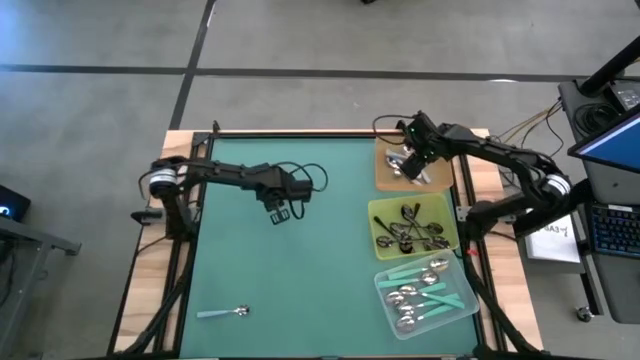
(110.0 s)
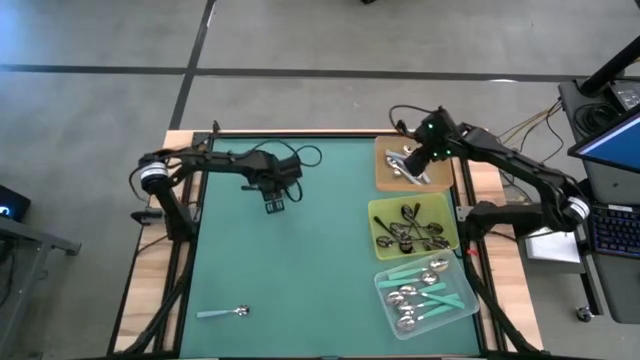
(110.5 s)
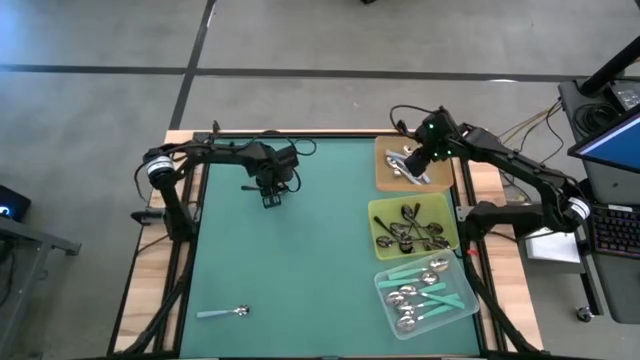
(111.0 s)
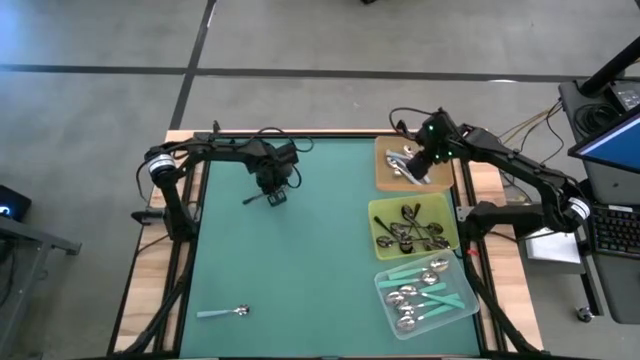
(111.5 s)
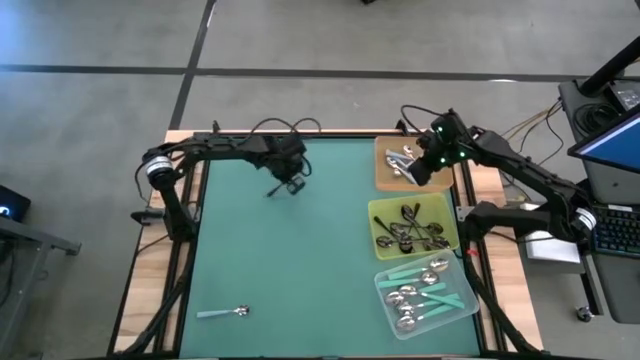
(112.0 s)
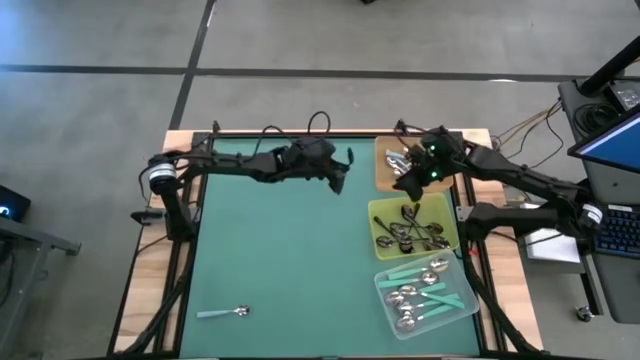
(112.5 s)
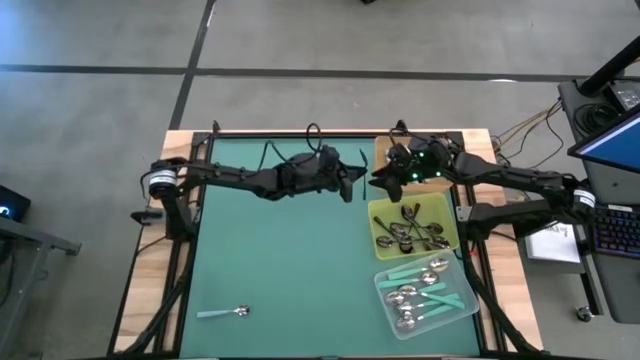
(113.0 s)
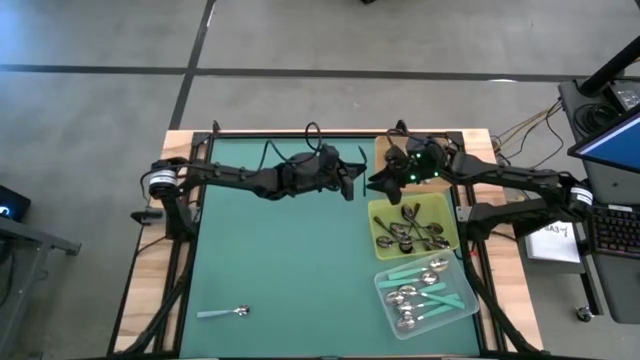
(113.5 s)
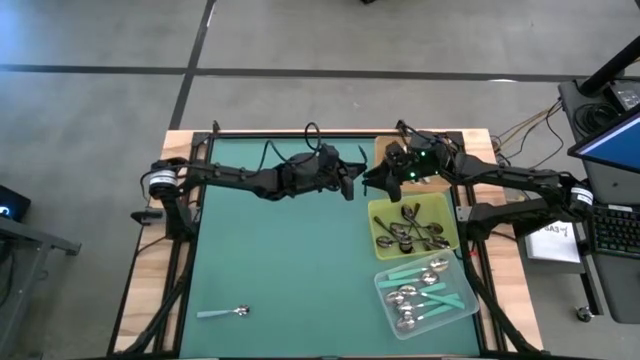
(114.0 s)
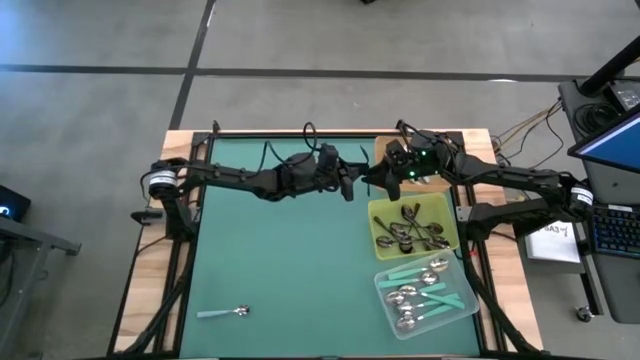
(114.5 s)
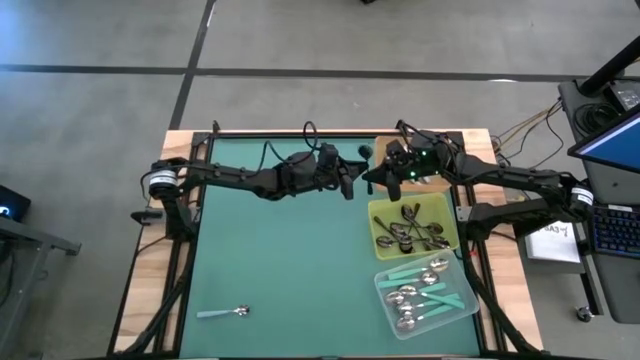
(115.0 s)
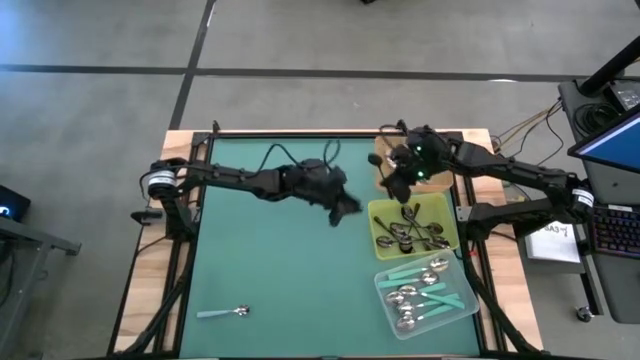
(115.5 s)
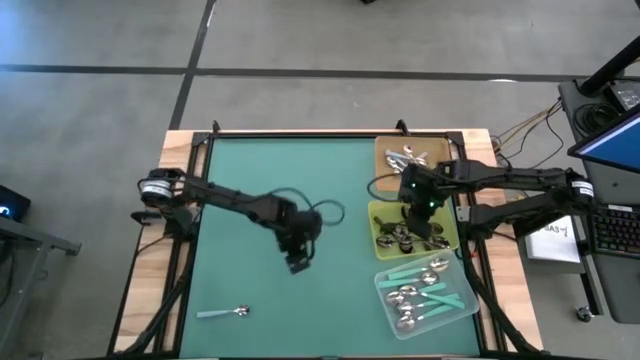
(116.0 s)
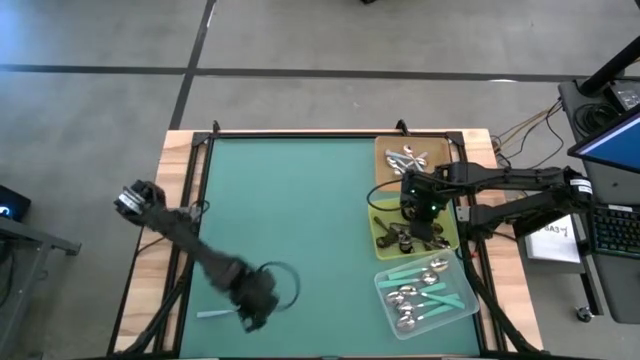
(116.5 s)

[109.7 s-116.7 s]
Task: Sort silverware by color (type)
Put the black spoon into the yellow bin

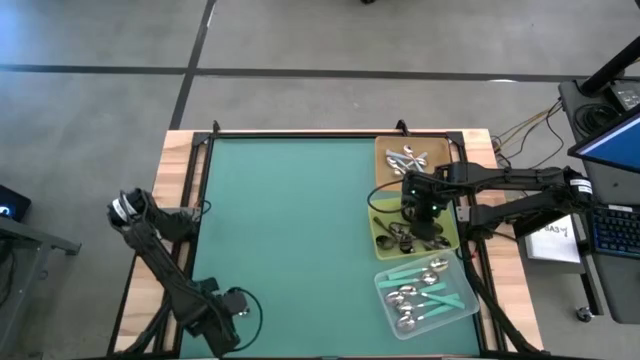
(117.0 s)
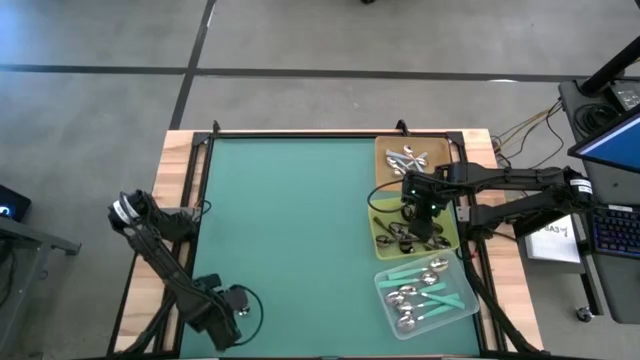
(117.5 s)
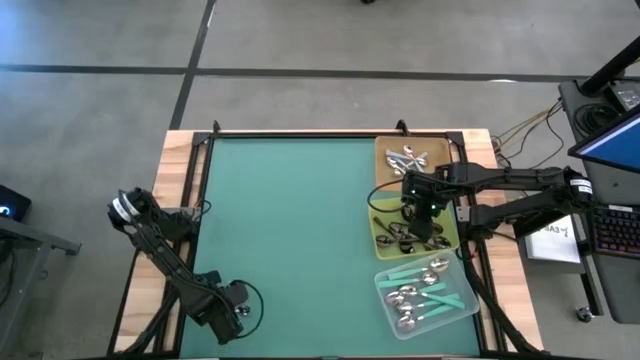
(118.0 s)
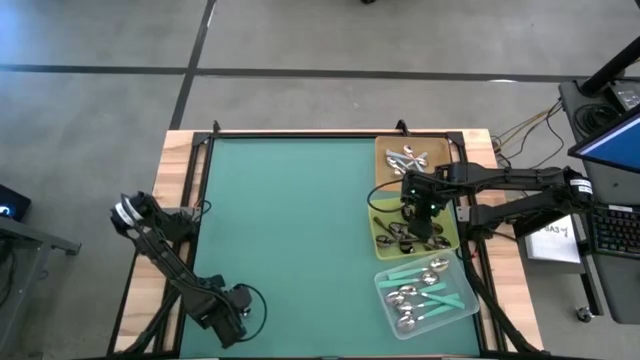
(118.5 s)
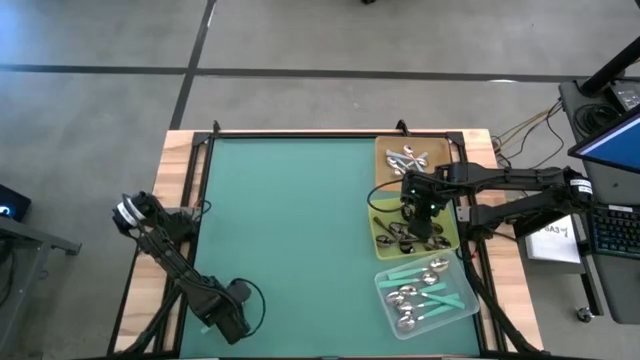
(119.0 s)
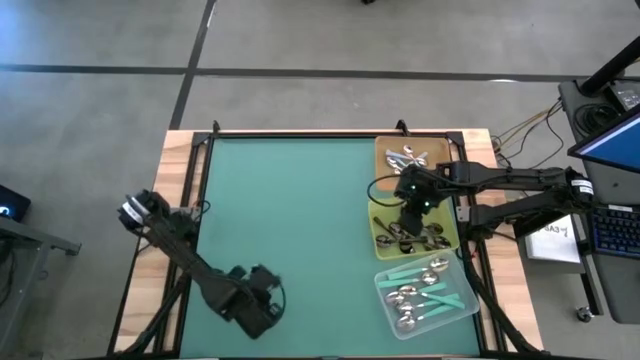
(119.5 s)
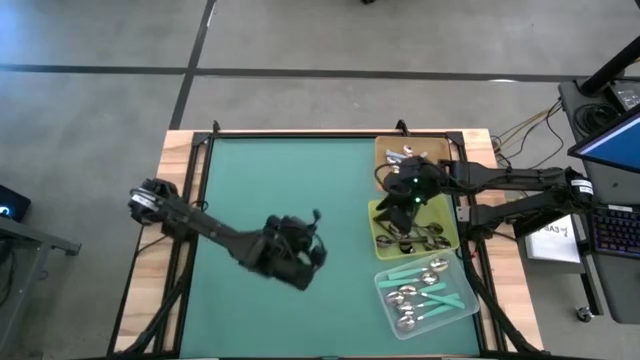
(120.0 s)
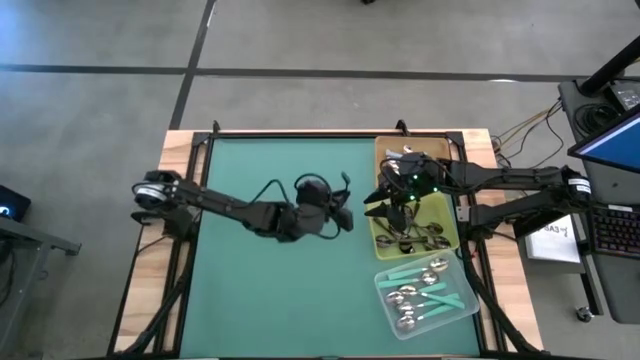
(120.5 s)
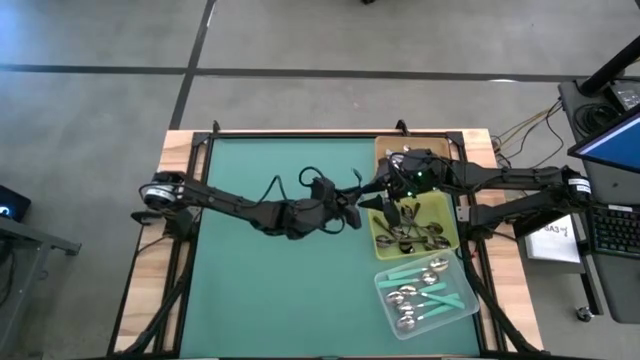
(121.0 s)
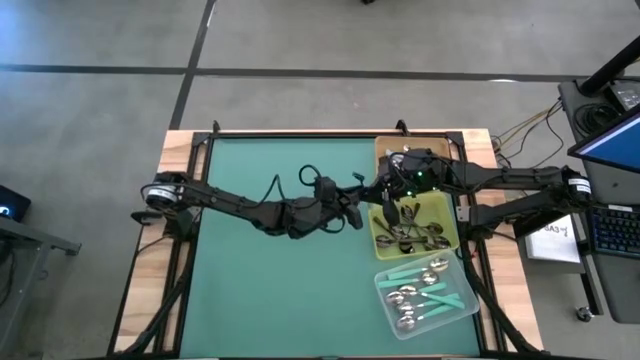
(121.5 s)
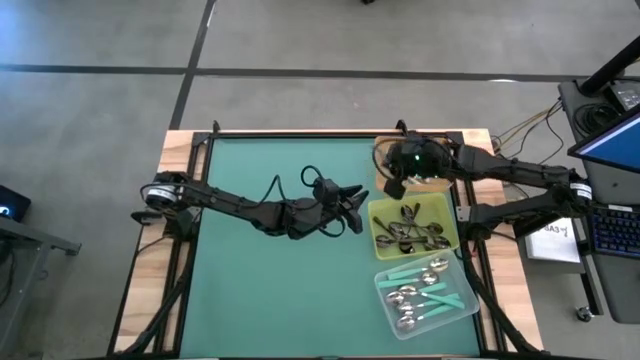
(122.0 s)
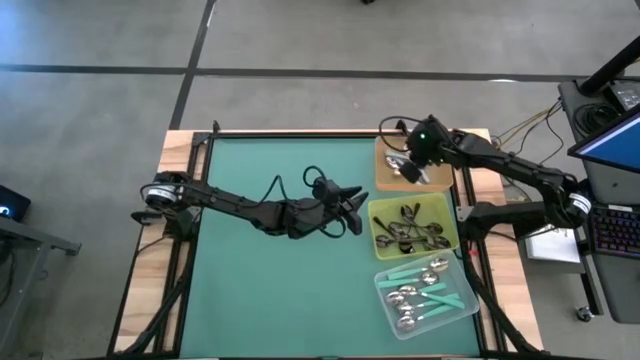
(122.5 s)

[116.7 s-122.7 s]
Put the blue spoon into the orange bin

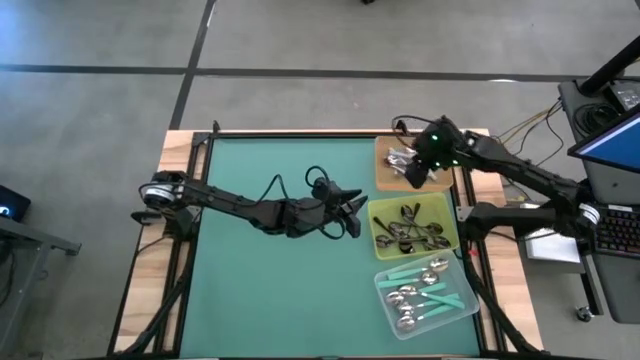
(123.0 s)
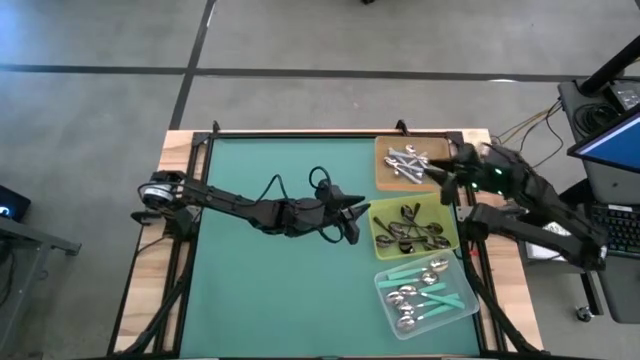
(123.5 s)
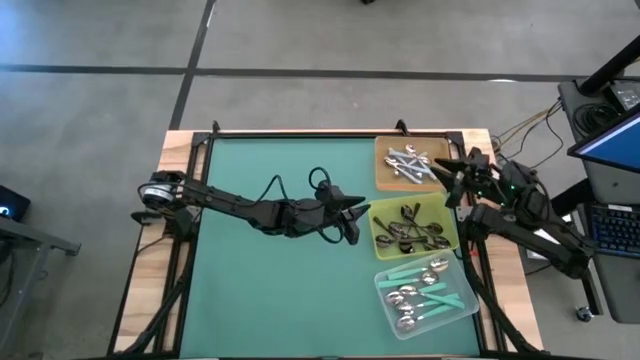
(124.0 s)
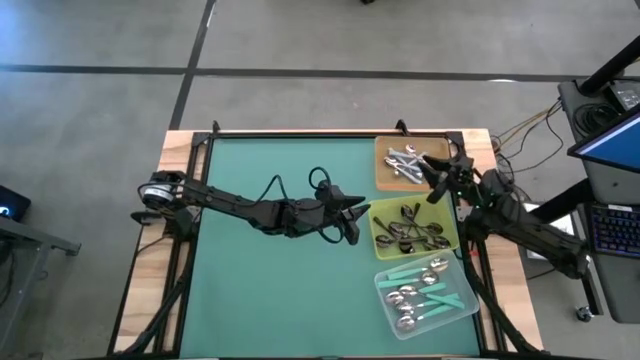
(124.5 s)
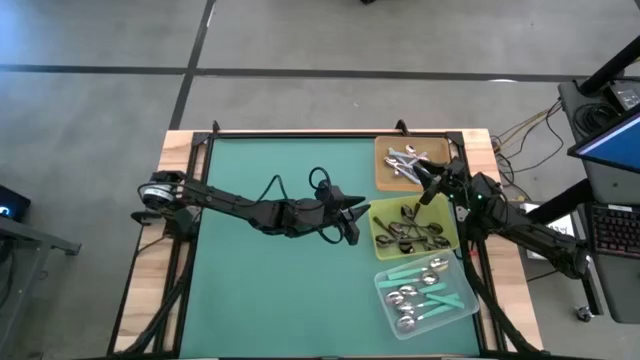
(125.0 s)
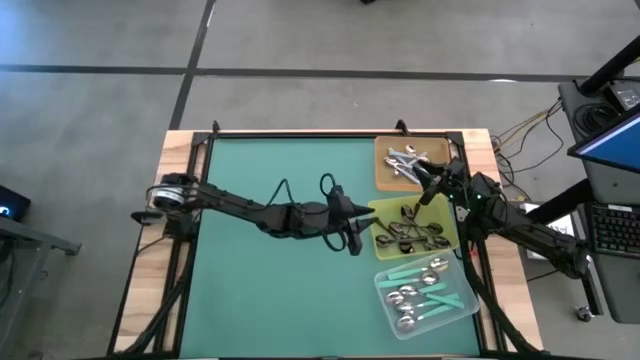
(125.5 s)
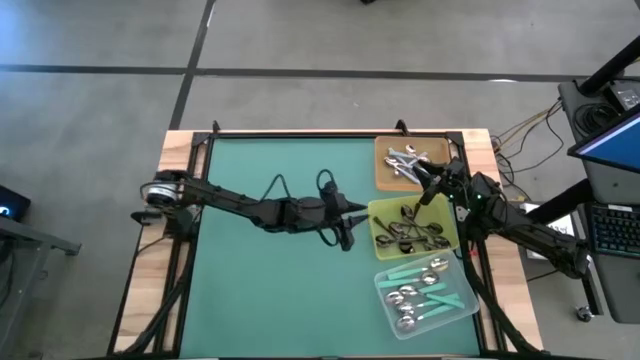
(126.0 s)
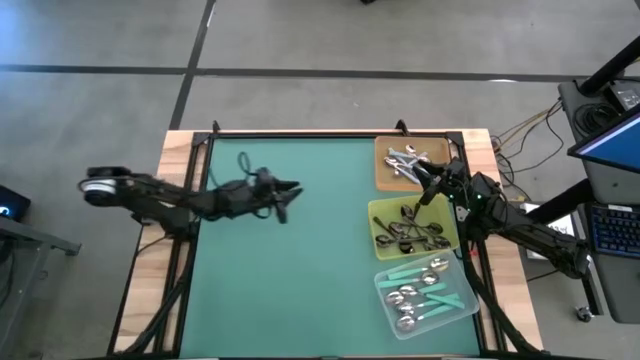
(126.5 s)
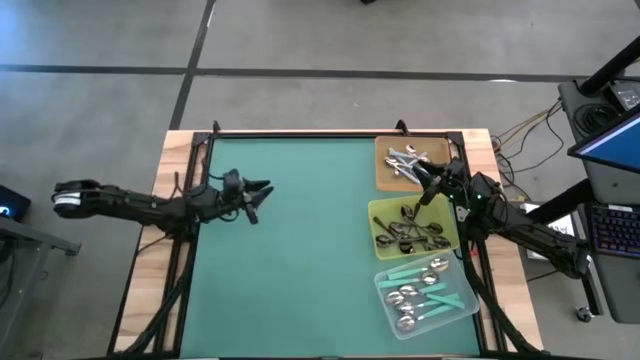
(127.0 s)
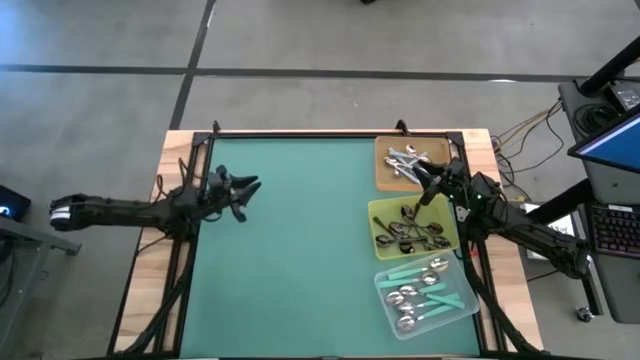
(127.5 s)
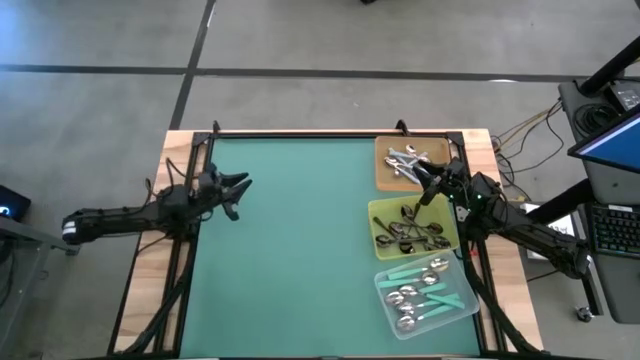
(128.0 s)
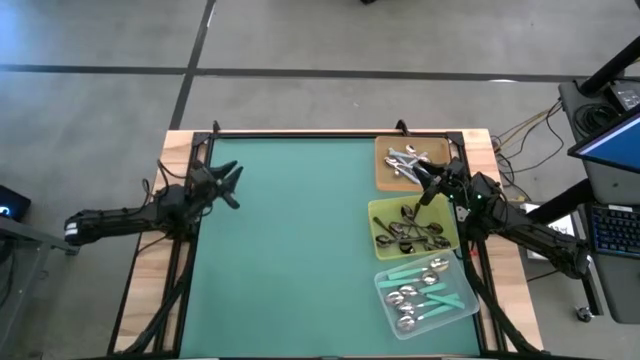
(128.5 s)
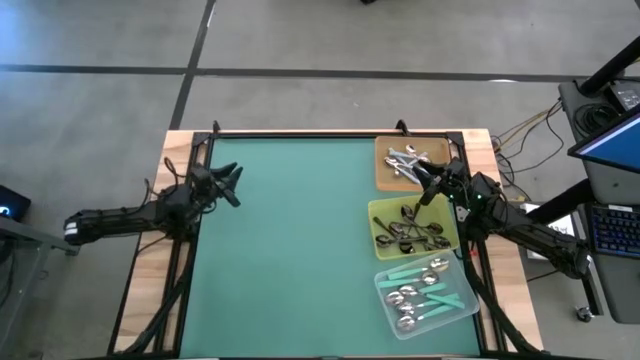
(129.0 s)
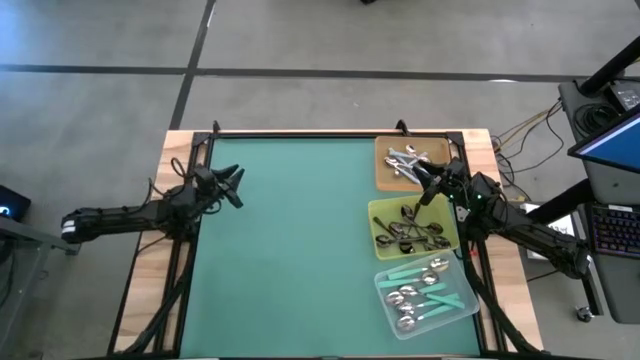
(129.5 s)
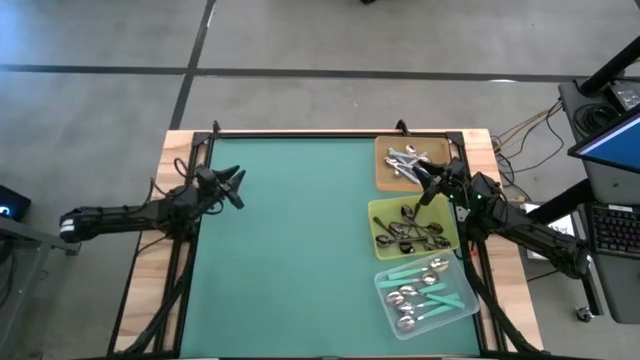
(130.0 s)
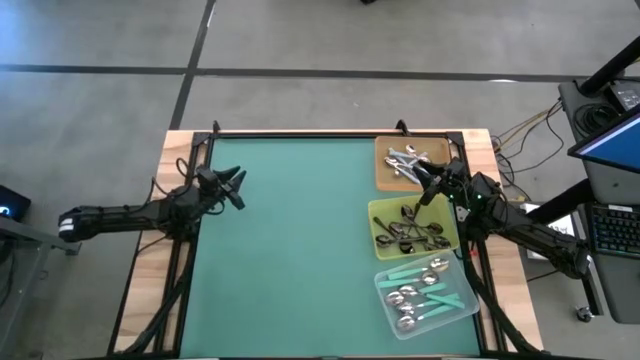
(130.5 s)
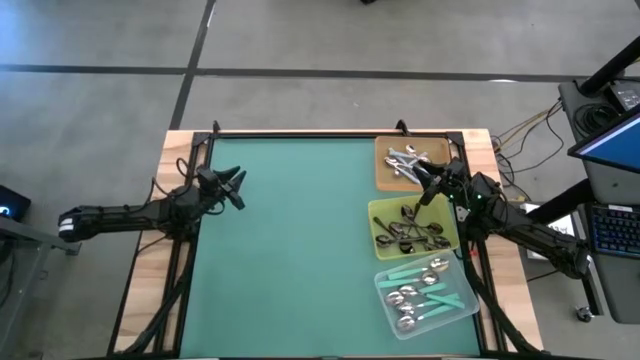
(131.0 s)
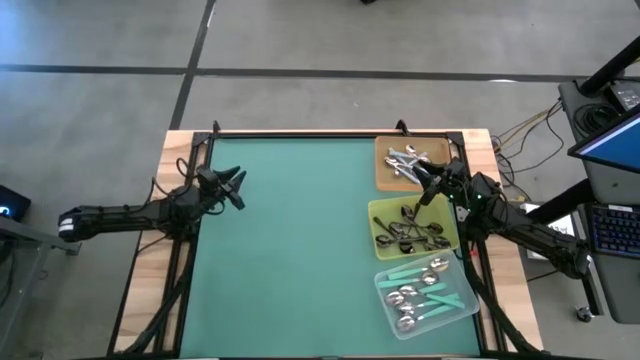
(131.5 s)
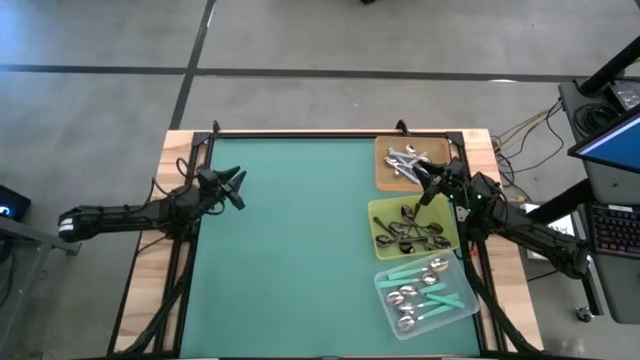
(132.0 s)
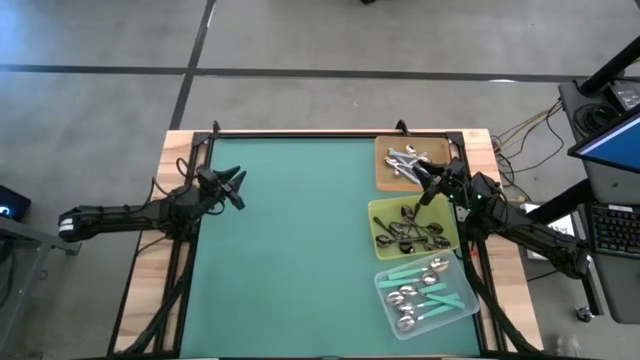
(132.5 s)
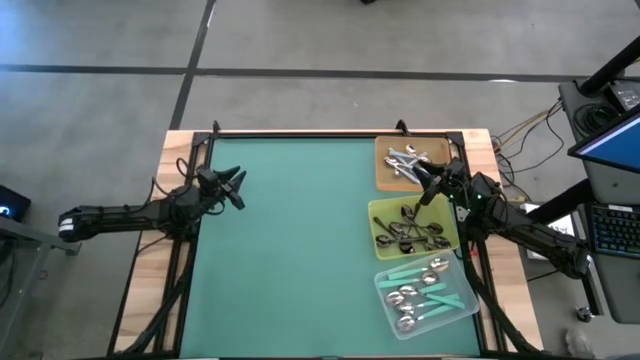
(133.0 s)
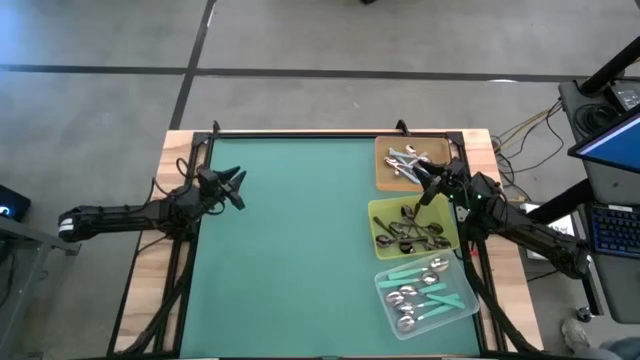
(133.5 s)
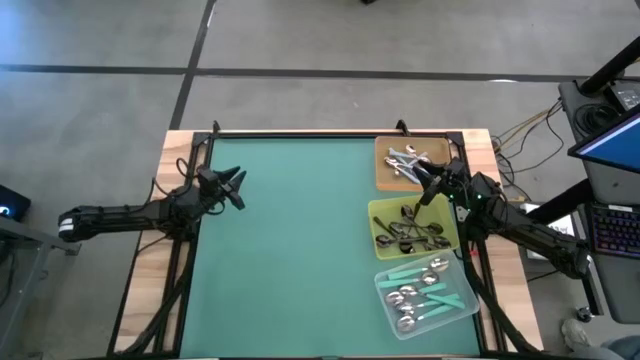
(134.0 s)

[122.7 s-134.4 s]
Return to Home Position
